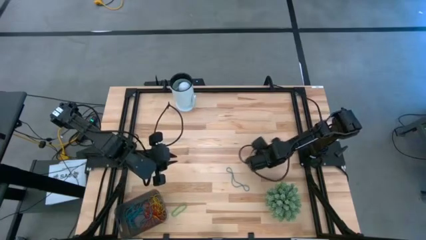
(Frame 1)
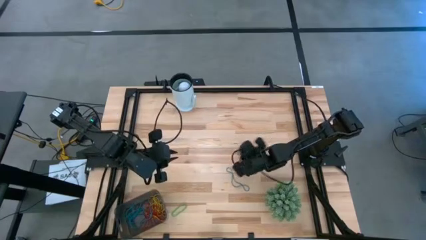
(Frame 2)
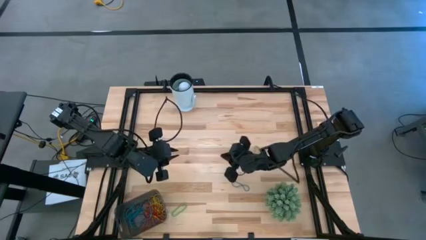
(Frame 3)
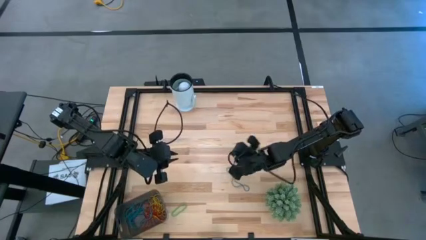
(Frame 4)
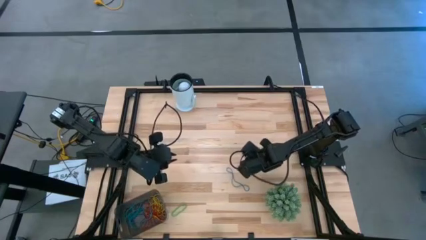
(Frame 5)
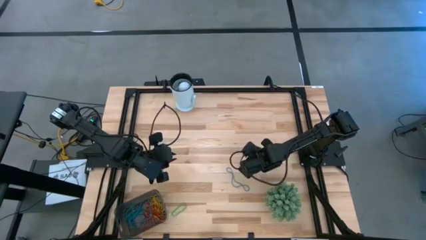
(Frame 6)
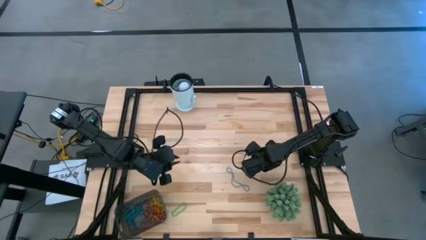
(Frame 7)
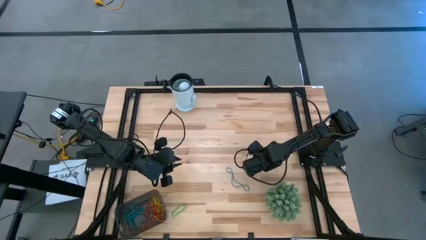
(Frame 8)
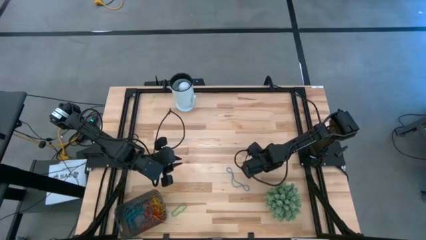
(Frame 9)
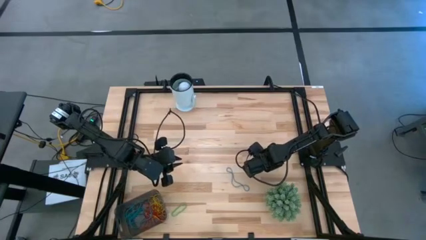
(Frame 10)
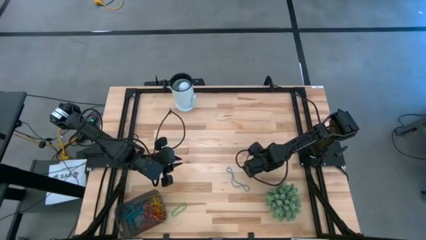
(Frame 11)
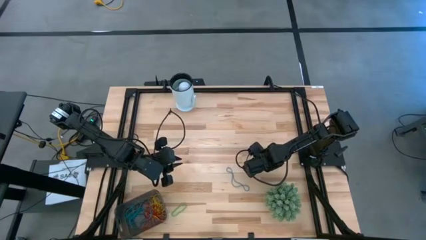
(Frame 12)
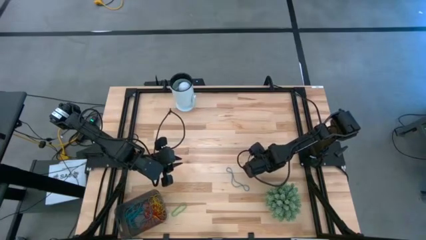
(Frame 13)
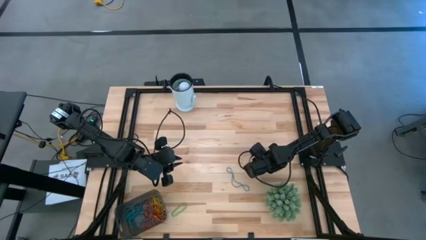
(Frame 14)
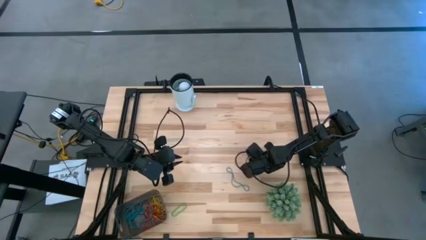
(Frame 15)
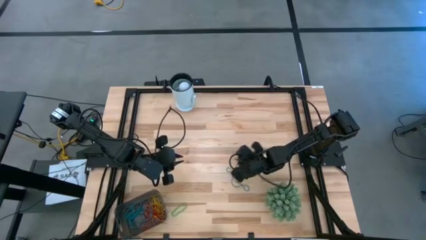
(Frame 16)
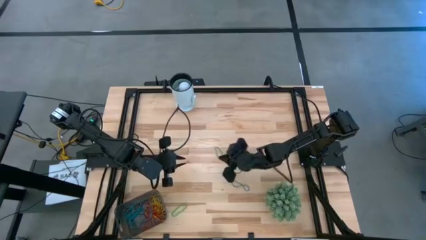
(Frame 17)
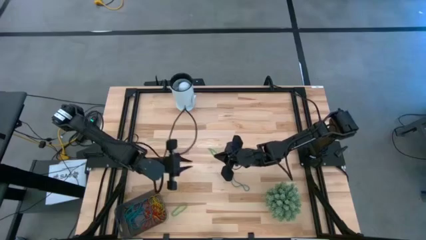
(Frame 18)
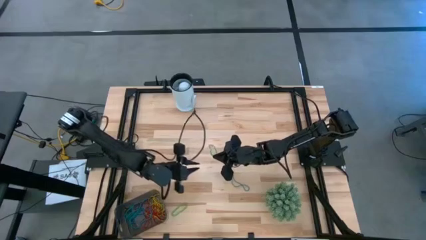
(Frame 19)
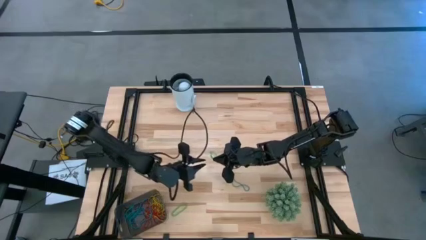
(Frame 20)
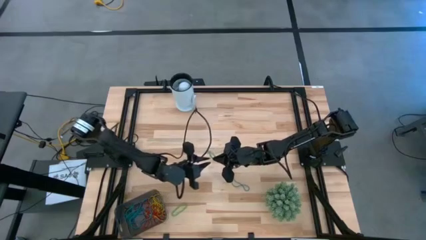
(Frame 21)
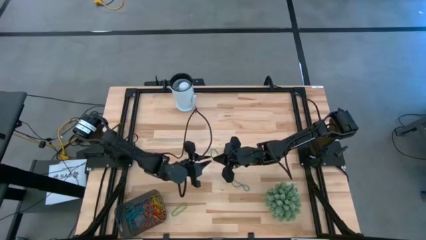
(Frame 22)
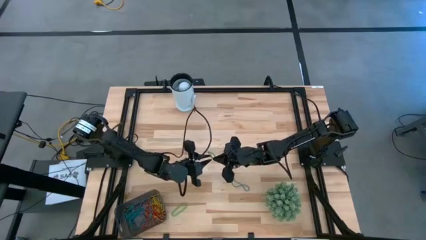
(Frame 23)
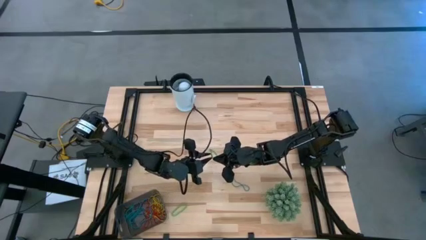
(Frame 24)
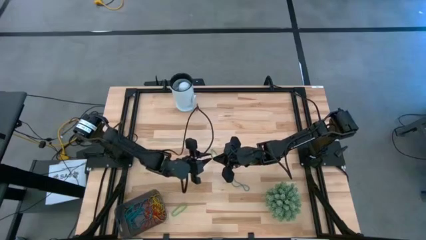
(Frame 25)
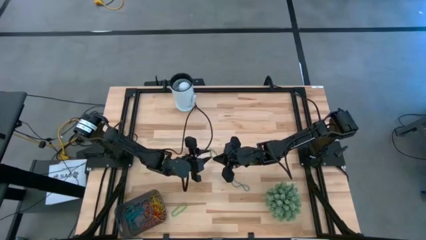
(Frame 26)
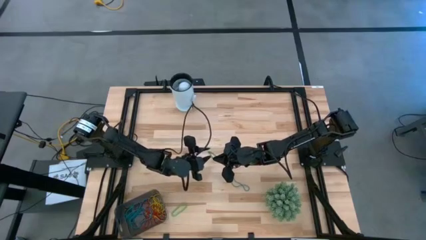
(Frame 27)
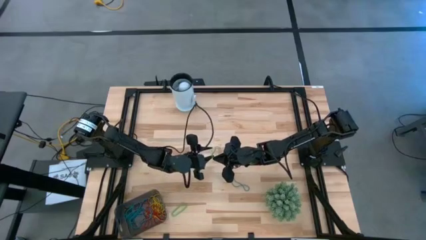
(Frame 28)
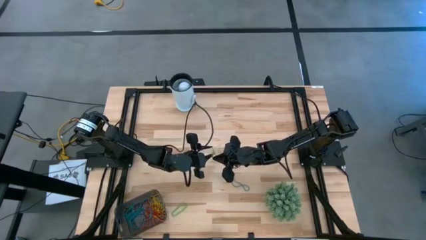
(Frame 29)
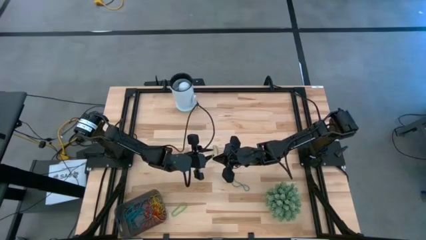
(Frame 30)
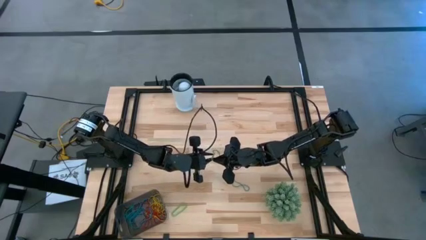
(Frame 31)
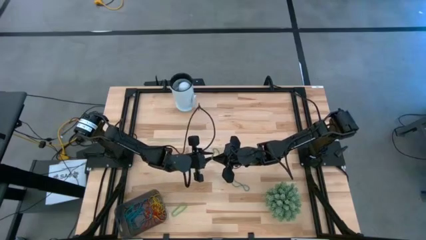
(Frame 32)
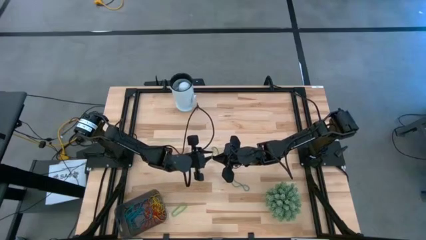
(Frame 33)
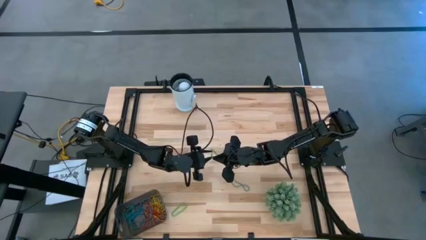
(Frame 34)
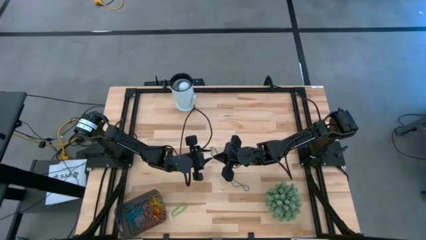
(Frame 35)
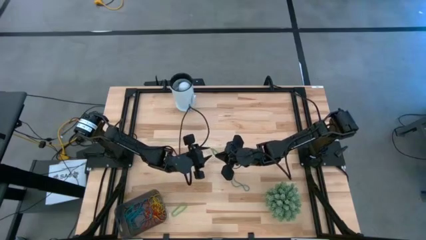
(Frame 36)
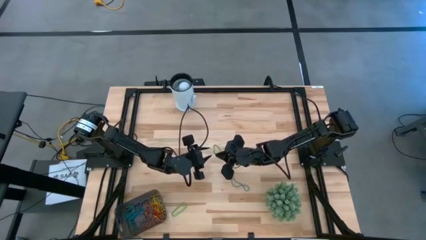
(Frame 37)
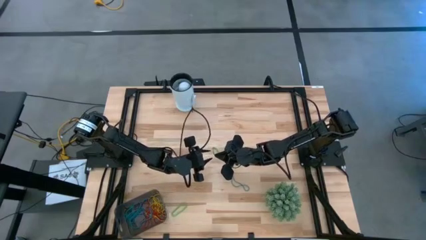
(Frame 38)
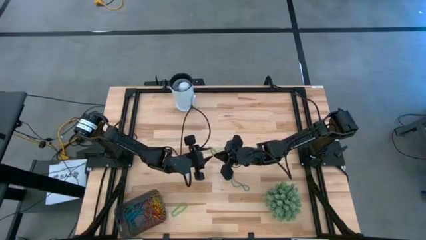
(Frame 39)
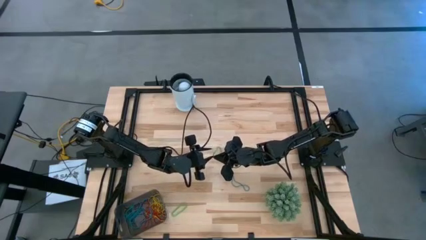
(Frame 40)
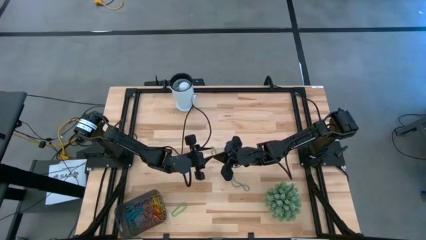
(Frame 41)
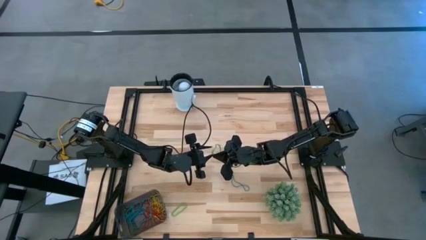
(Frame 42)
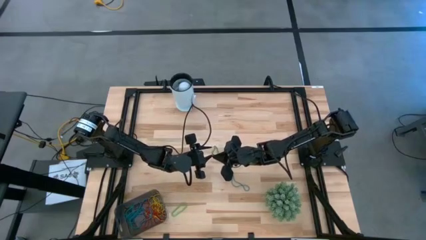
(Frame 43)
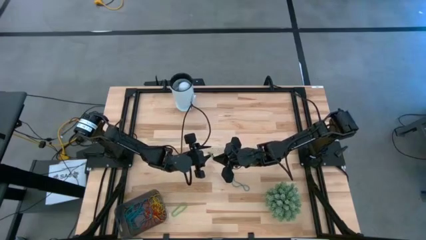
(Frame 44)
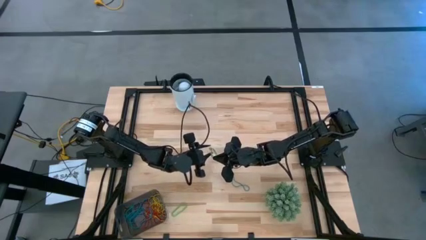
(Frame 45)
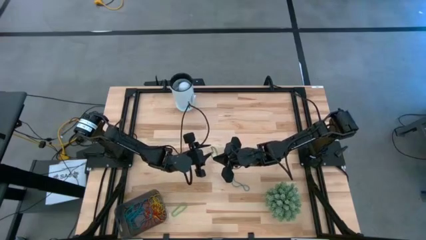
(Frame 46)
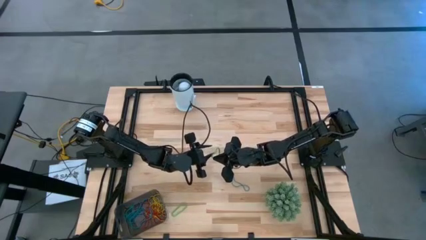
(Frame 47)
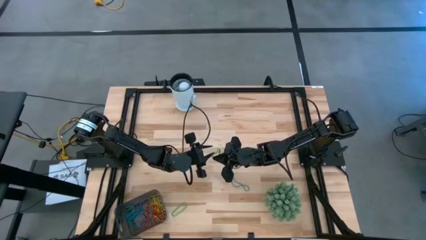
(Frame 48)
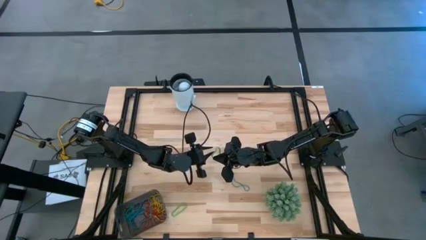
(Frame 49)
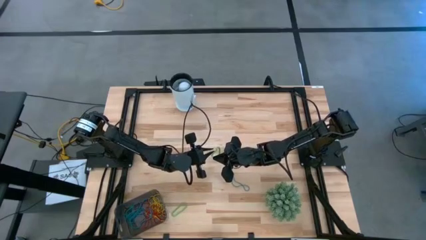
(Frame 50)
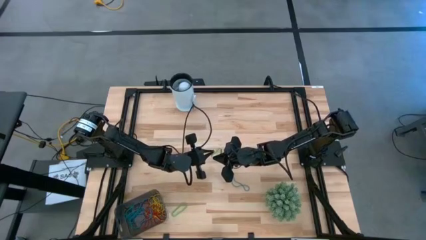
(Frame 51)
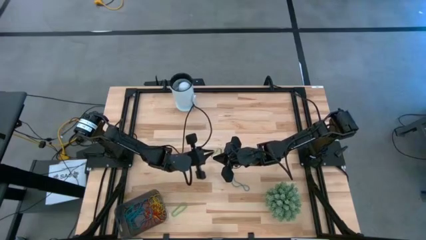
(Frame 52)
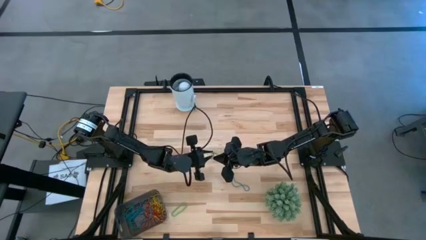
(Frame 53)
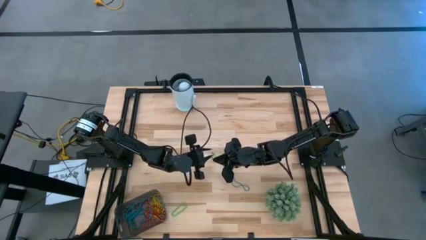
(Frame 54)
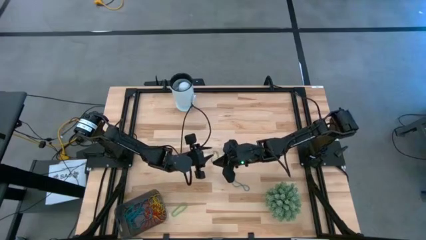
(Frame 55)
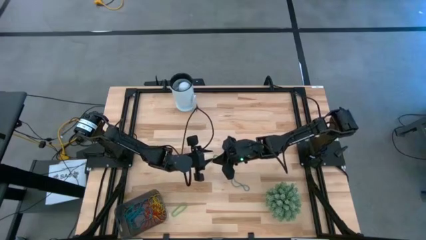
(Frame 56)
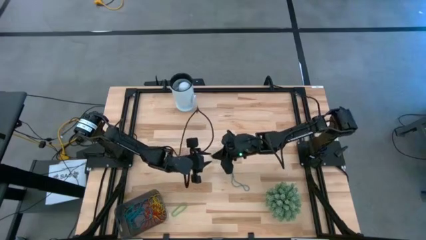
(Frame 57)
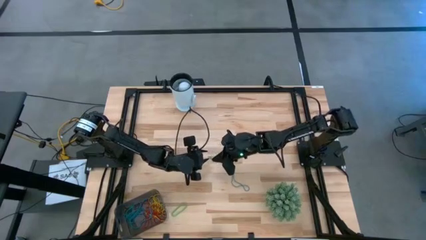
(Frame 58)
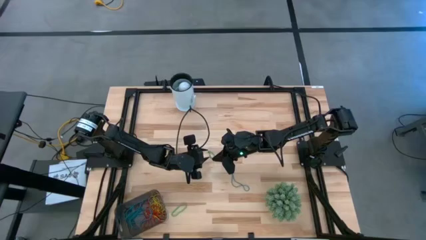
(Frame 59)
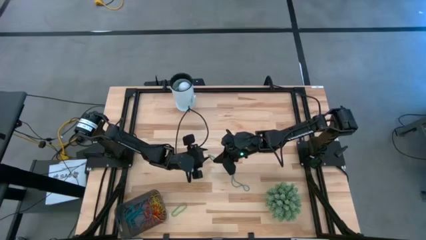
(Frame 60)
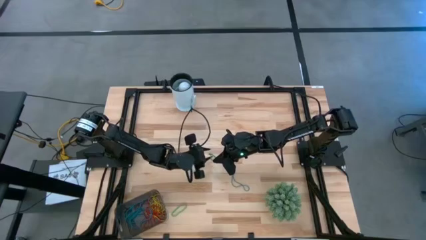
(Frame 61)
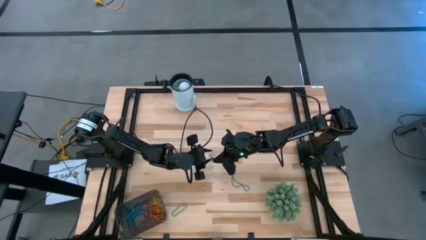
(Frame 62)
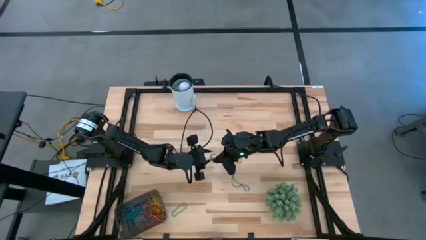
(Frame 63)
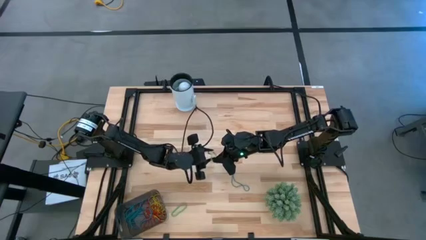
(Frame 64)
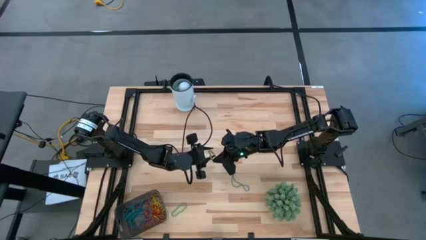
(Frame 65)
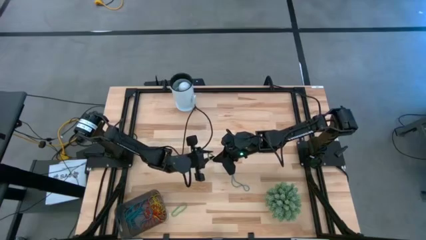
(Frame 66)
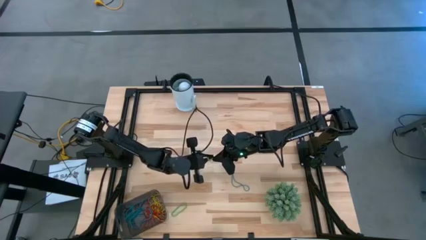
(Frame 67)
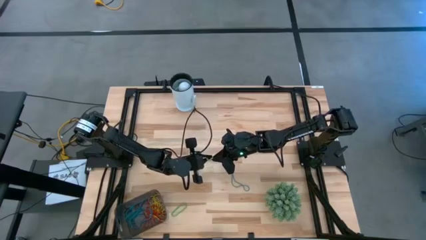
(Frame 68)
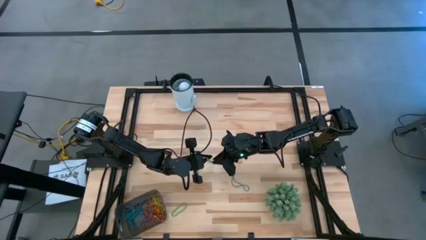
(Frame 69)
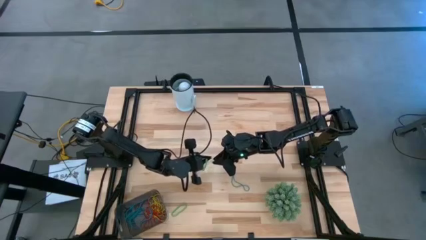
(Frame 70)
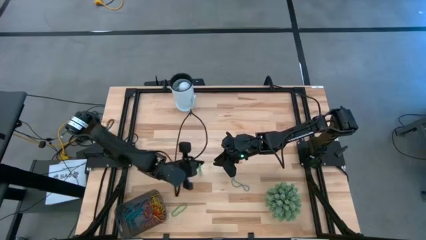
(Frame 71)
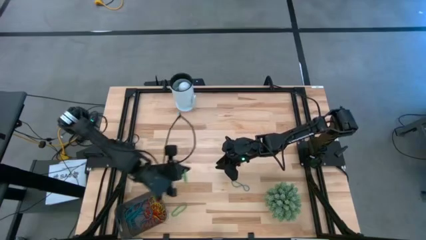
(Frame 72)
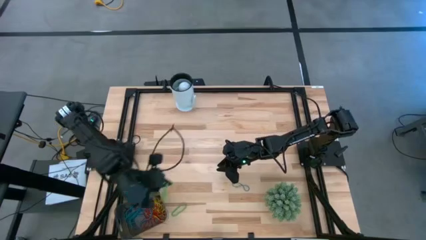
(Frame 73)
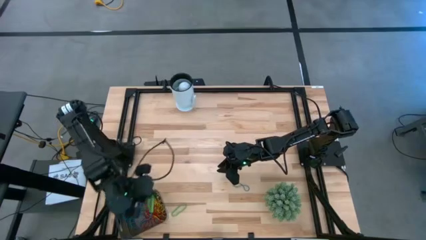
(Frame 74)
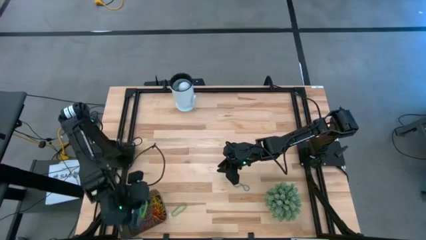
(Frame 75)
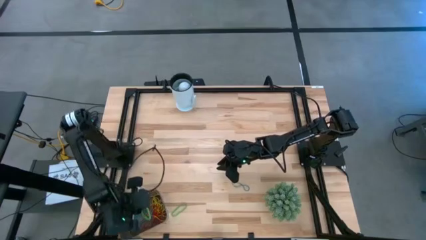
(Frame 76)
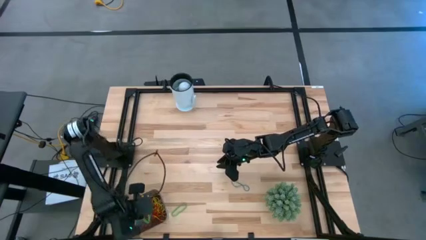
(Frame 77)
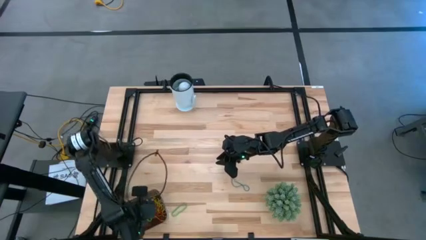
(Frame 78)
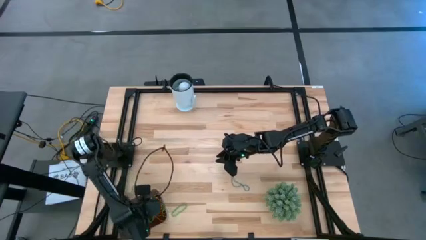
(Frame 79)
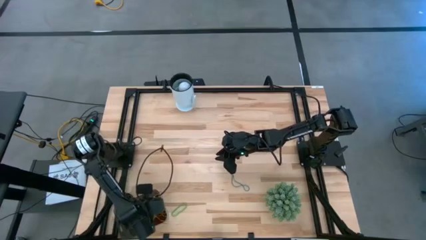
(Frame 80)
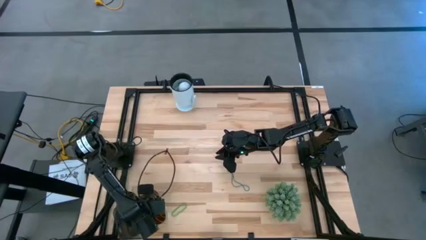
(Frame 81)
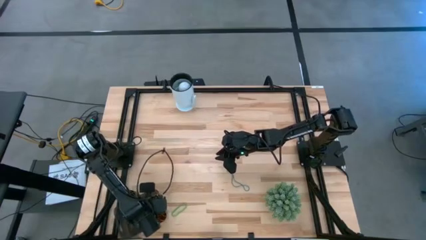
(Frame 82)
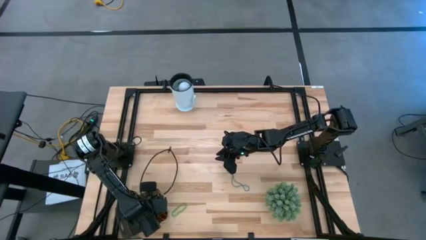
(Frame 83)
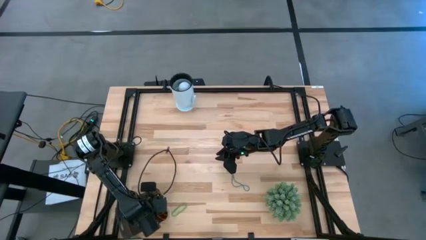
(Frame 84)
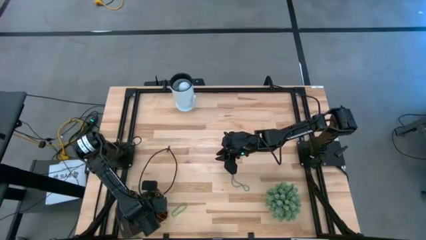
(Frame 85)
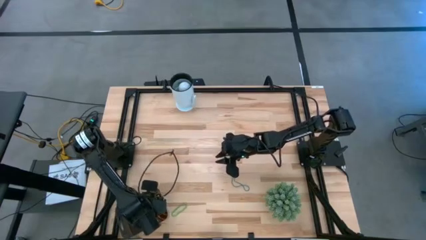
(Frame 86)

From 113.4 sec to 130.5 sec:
Task: Pick and place items into bin
Put the green rubber band into the black bin
